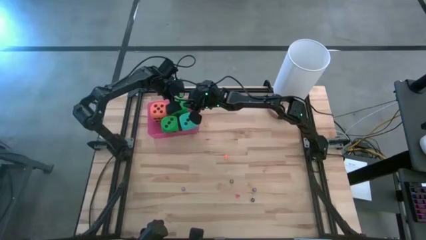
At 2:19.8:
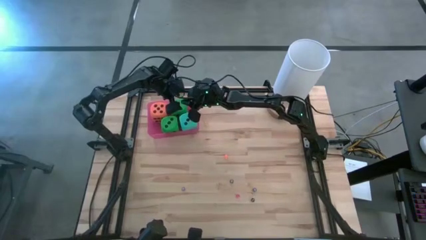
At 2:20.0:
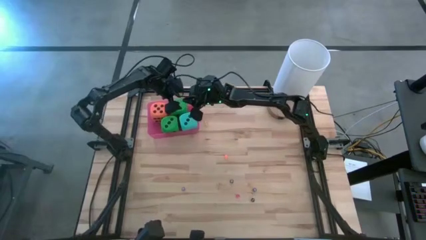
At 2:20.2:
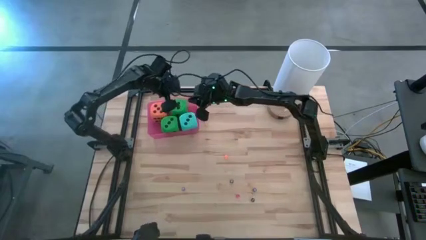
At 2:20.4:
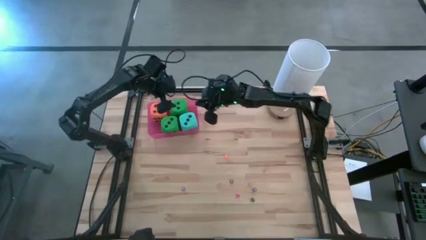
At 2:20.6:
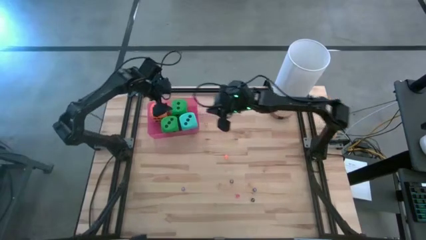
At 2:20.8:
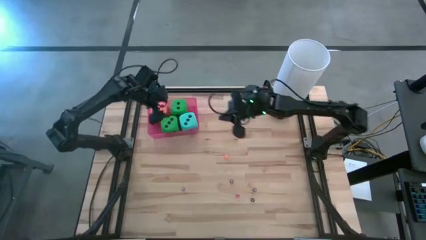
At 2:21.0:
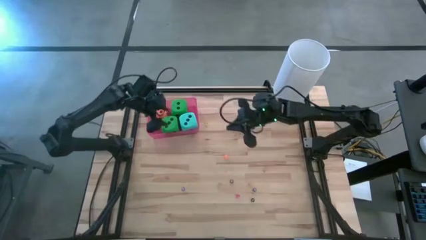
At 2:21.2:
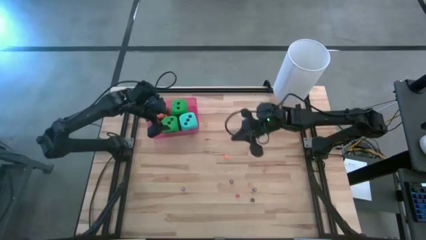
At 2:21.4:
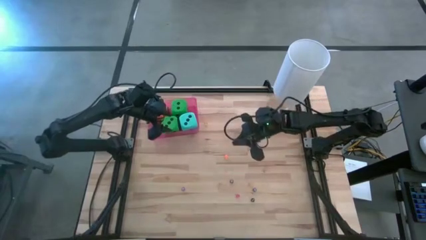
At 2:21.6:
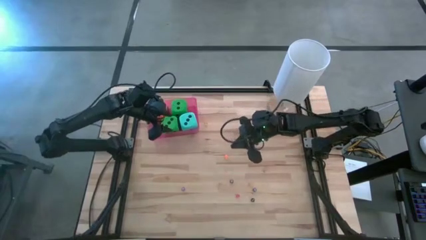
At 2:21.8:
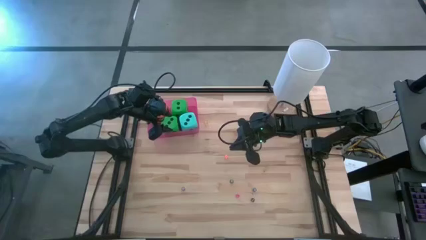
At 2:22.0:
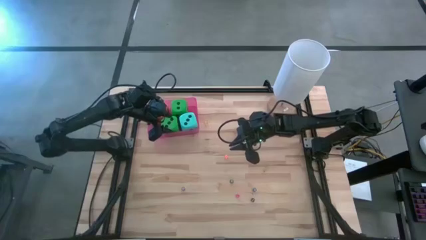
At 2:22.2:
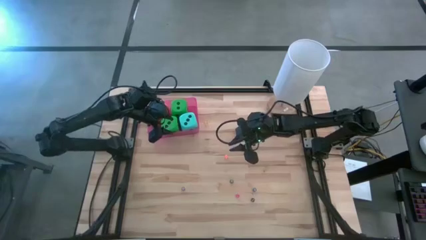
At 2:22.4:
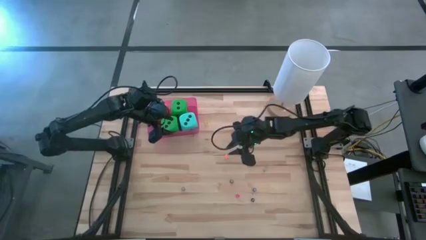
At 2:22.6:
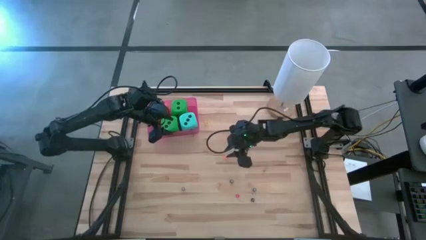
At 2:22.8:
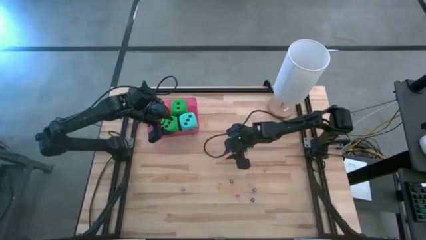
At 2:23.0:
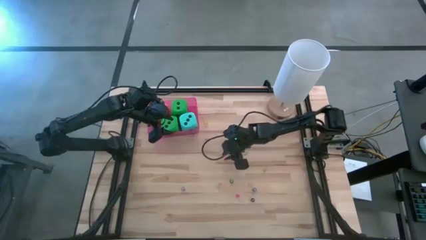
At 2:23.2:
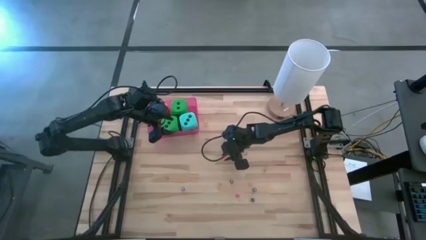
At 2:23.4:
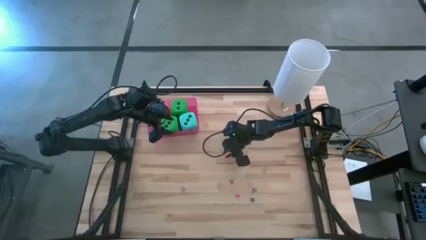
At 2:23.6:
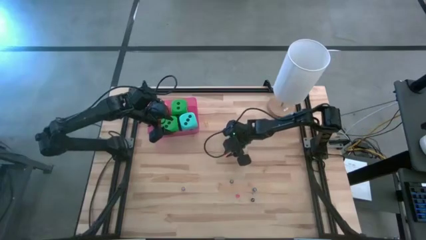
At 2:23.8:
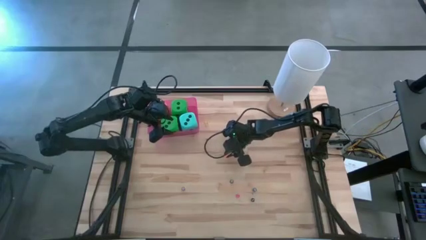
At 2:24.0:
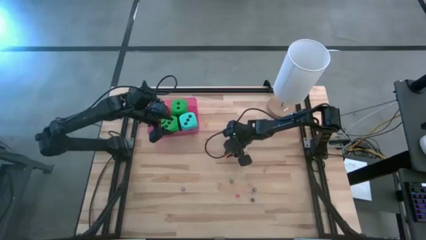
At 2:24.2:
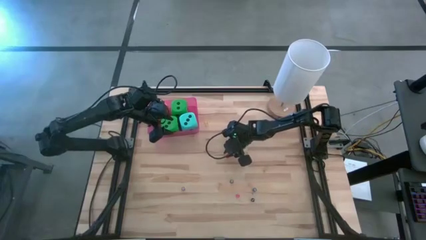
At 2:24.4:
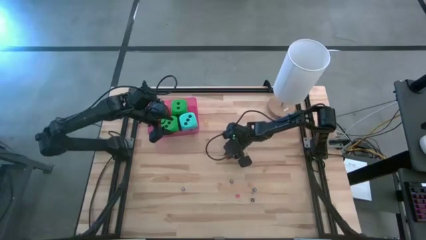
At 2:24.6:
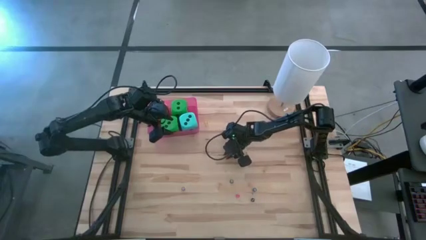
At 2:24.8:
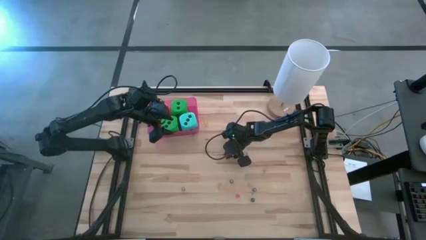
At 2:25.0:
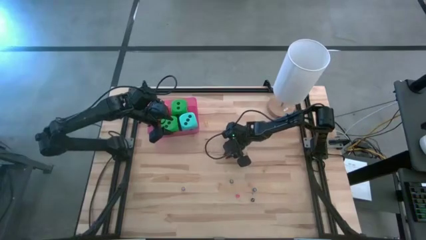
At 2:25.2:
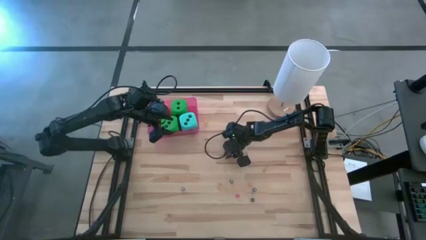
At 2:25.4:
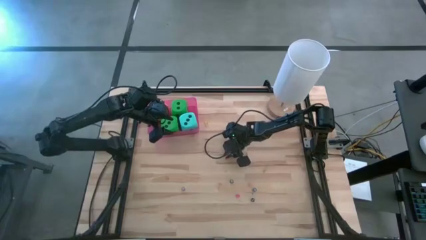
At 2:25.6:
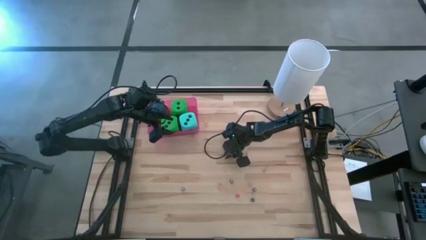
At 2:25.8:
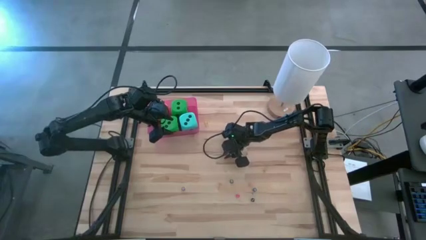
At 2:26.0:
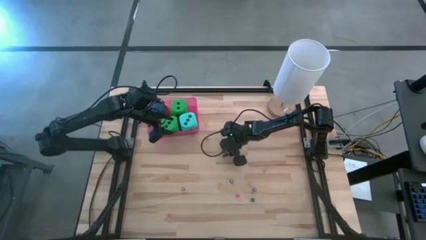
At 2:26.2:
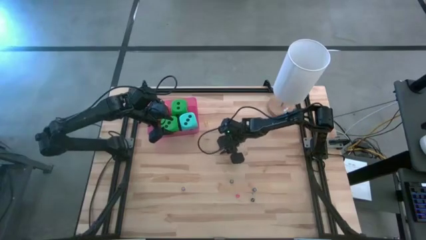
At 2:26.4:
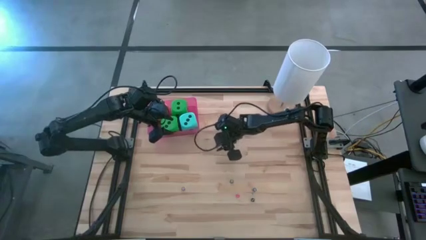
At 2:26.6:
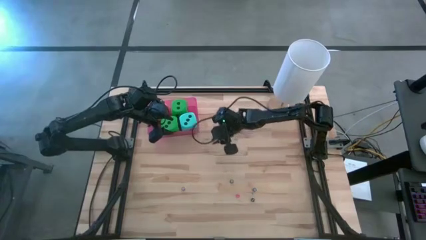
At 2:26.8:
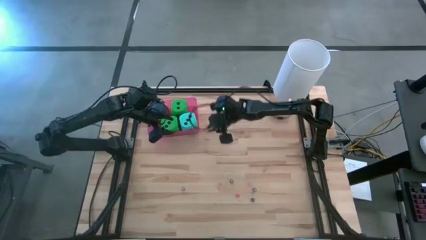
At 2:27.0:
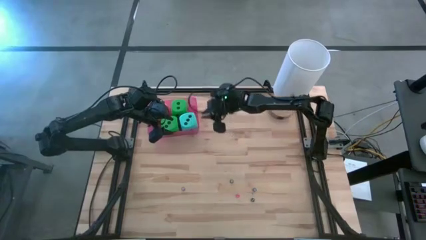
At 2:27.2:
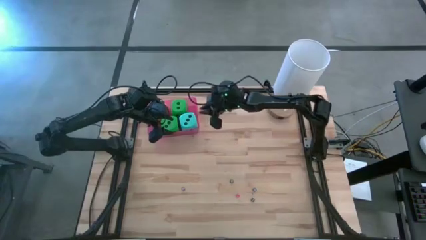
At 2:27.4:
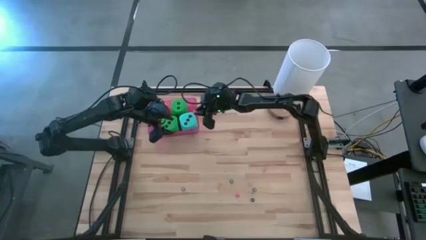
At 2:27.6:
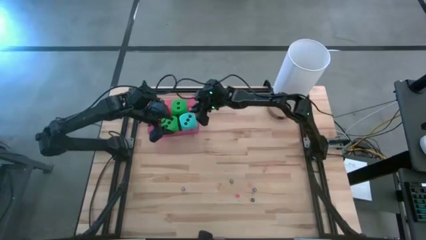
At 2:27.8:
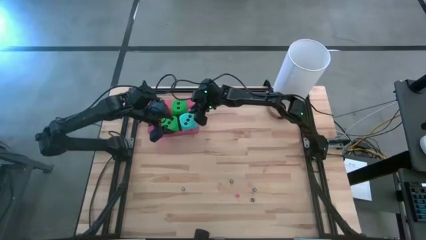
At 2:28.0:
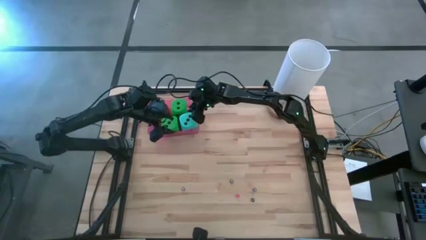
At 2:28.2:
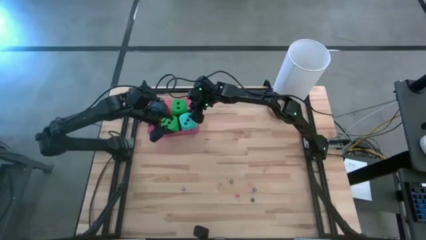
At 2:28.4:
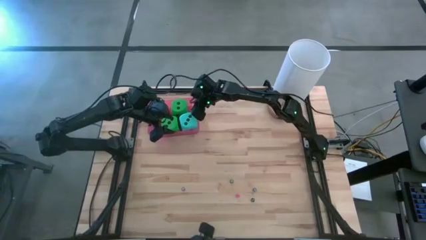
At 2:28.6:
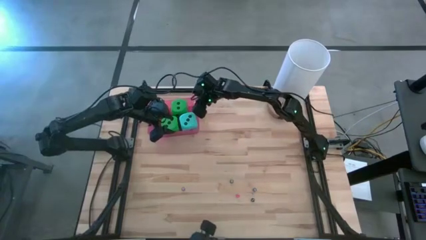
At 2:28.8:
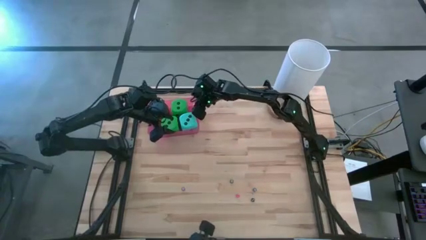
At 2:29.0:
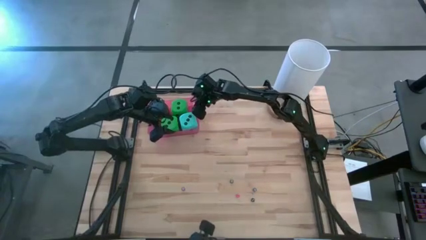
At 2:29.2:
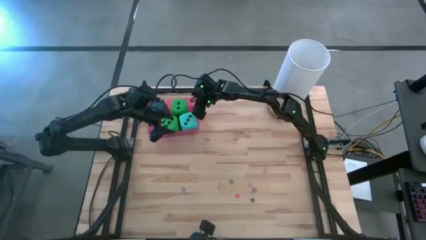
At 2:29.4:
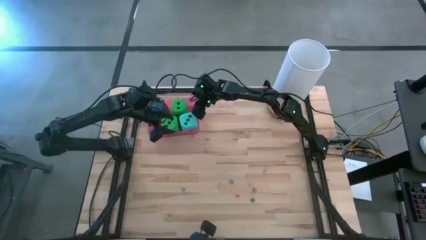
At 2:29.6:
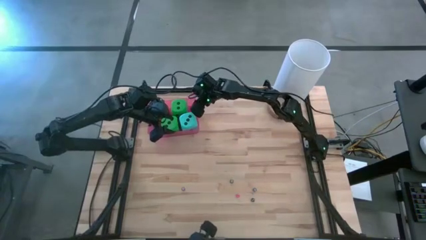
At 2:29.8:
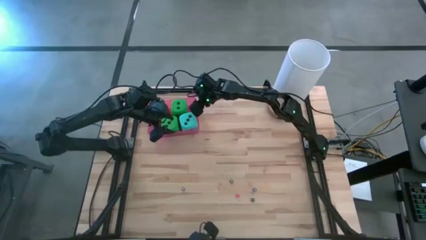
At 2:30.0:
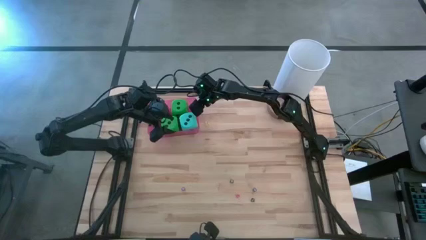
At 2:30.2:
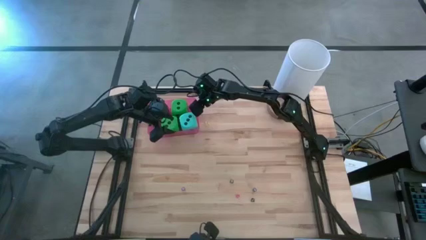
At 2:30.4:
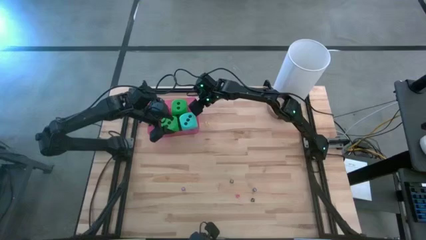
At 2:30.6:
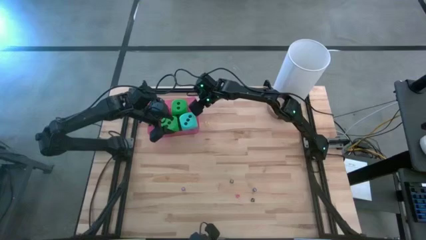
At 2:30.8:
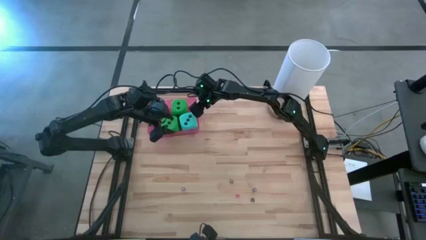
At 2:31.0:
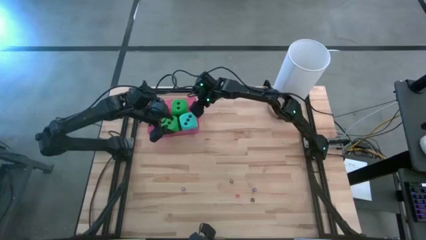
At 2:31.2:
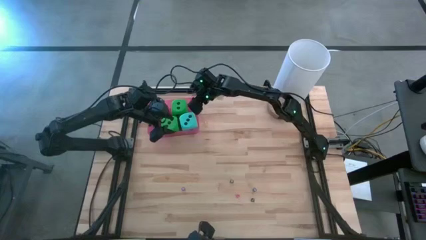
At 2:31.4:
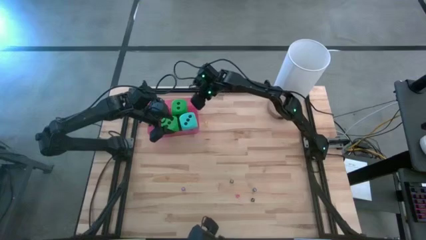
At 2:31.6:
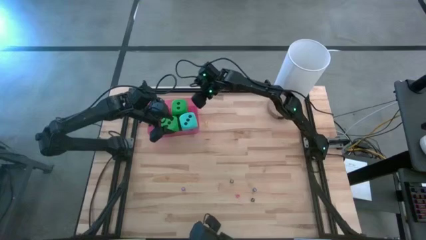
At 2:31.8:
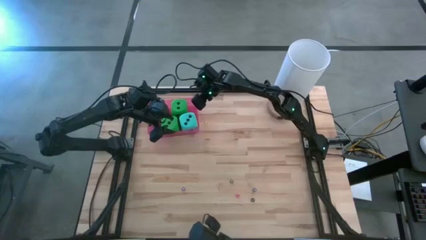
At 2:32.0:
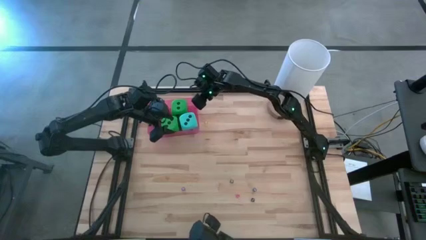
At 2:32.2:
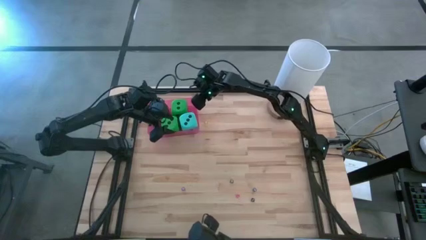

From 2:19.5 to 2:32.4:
Task: Pick & Place Dice
Put the small orange dice into the red bin

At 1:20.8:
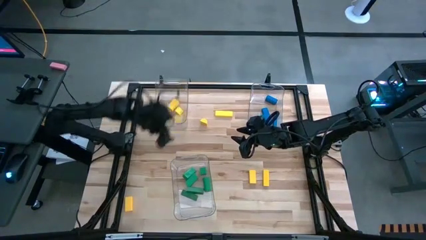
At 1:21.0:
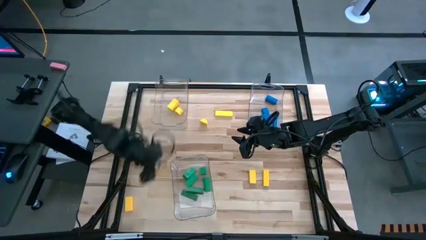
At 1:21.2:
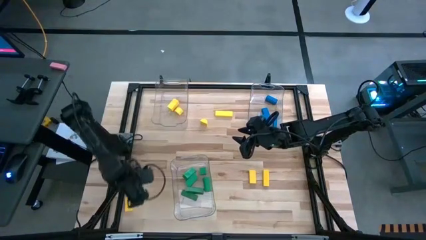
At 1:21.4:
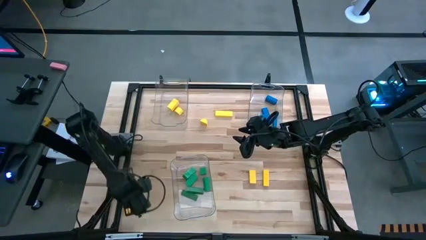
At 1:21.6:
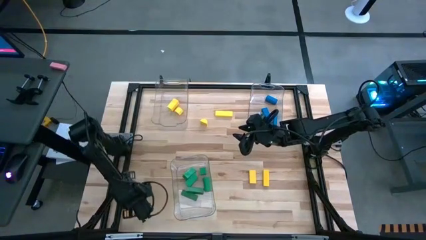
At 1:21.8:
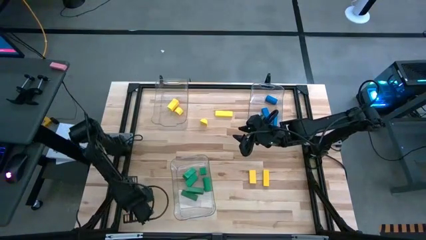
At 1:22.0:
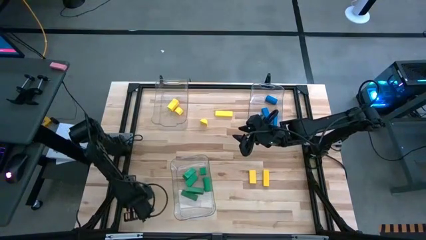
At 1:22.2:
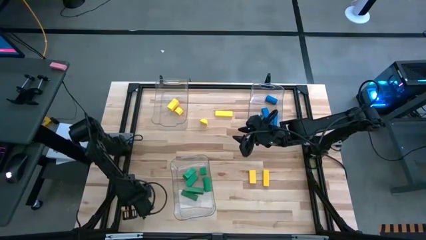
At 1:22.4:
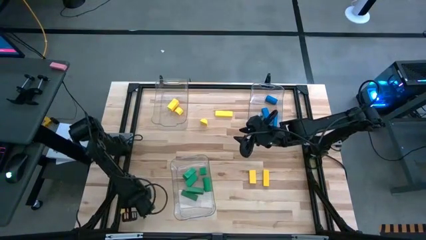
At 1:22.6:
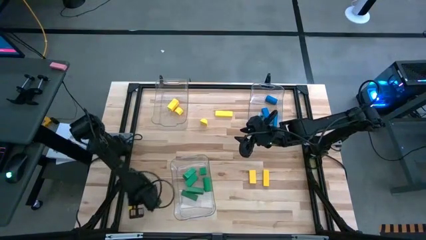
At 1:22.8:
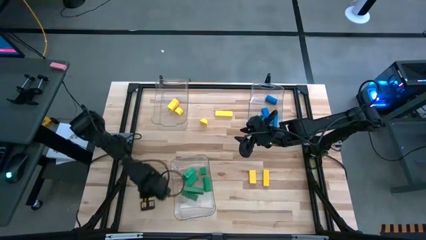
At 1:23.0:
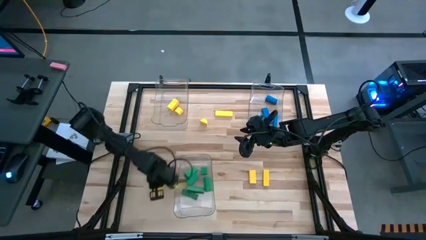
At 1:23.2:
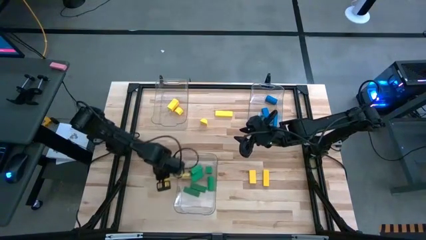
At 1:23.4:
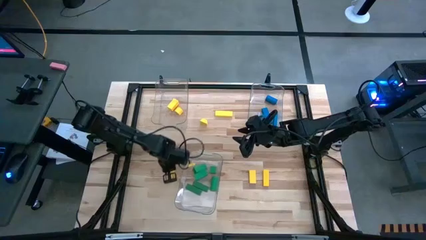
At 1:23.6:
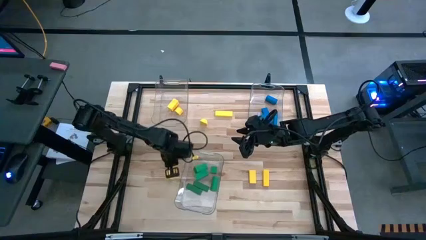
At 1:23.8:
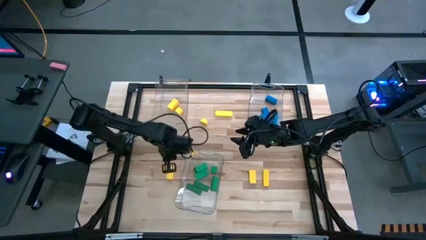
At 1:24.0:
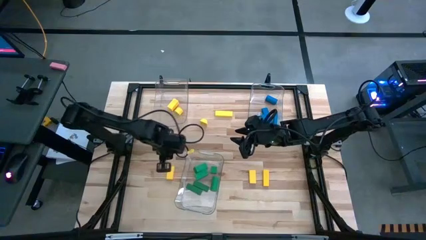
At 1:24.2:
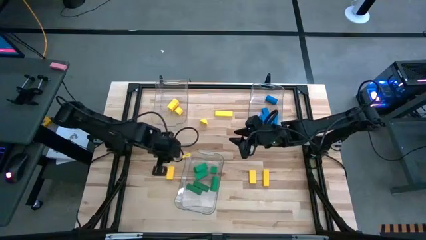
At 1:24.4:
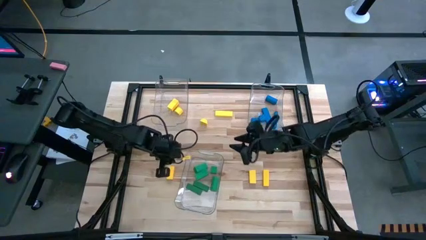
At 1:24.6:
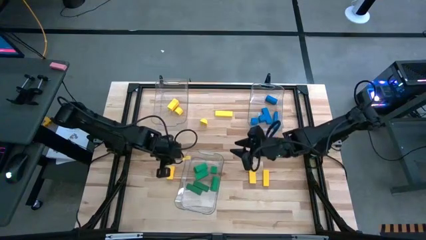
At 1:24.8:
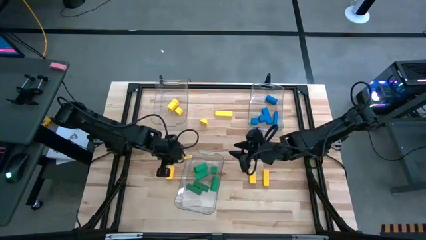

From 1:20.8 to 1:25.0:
Task: Sort blocks
Move the yellow block to the middle left of the table
